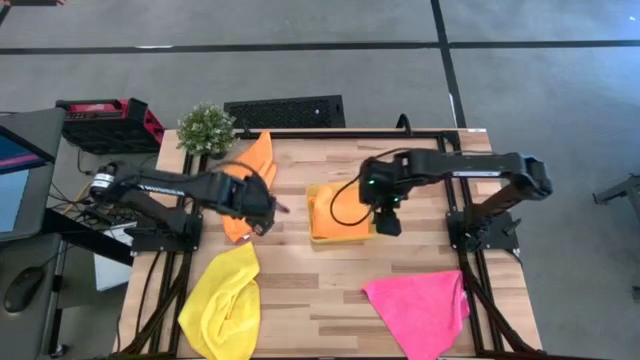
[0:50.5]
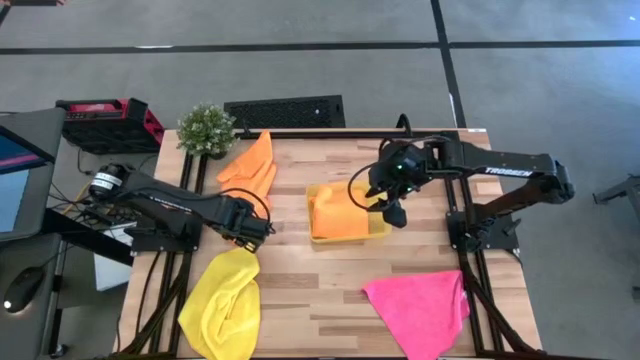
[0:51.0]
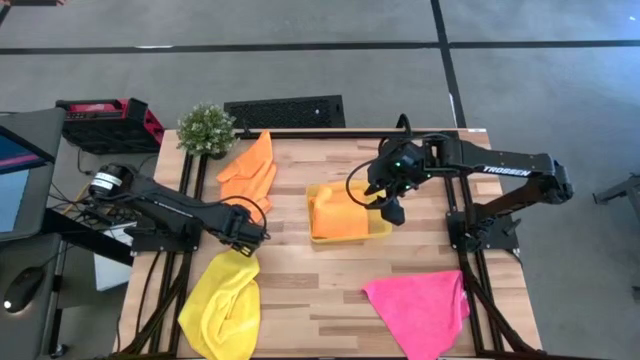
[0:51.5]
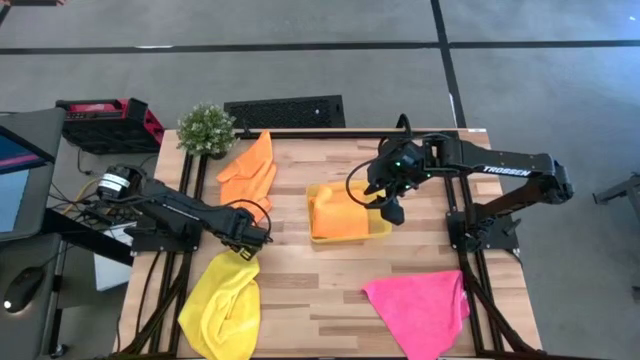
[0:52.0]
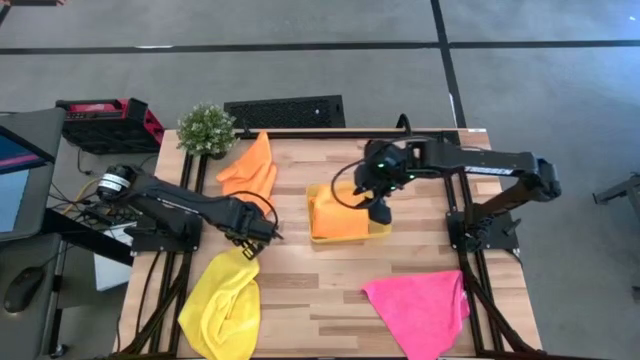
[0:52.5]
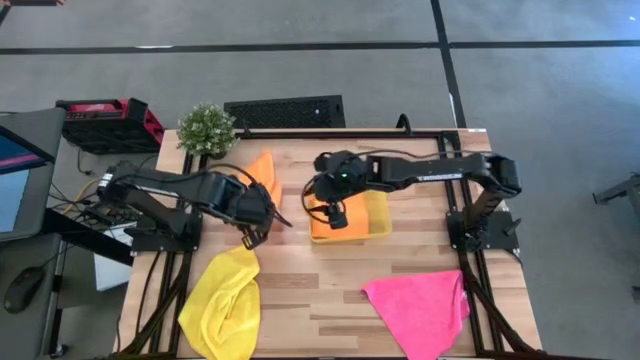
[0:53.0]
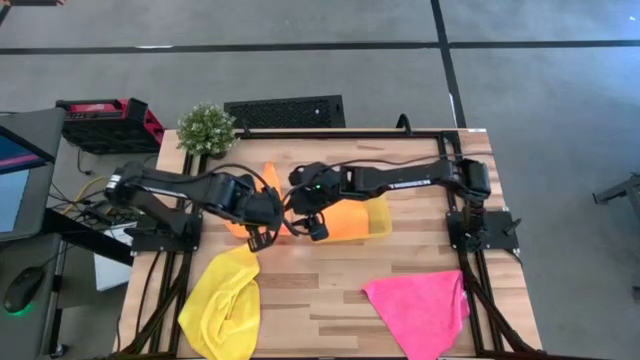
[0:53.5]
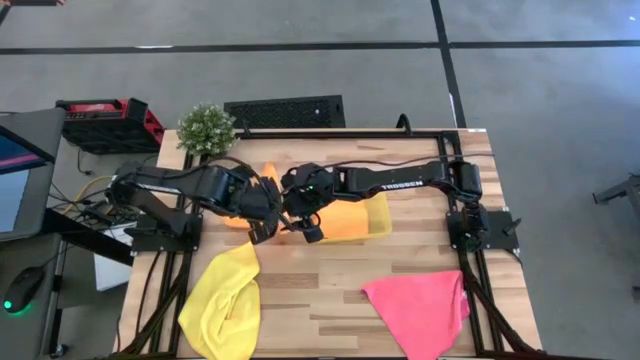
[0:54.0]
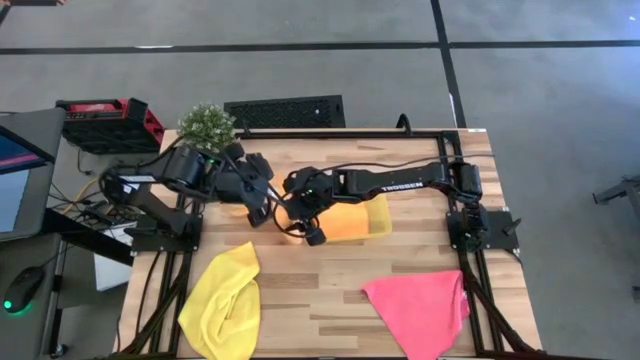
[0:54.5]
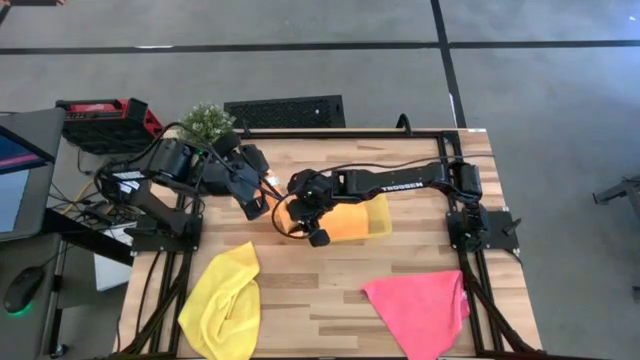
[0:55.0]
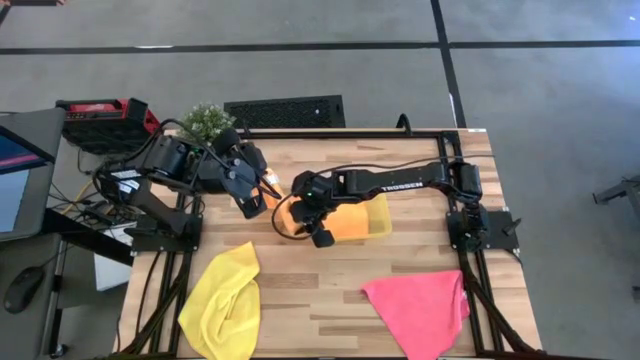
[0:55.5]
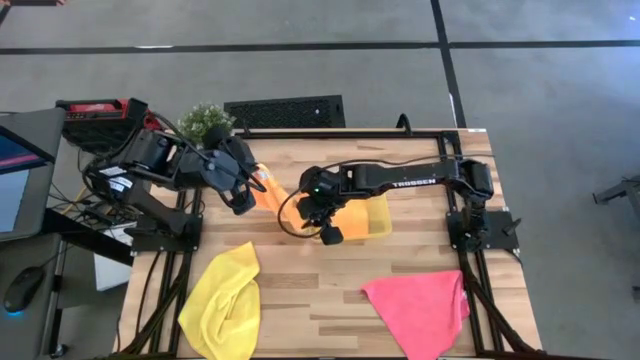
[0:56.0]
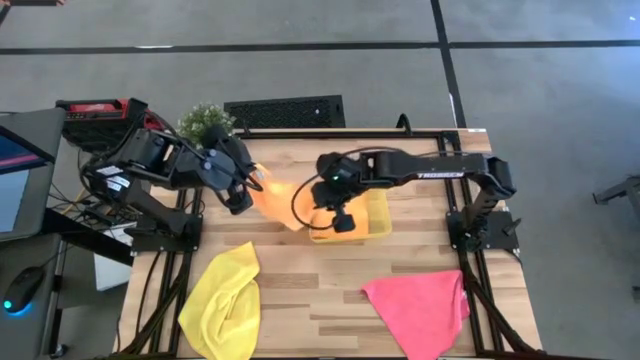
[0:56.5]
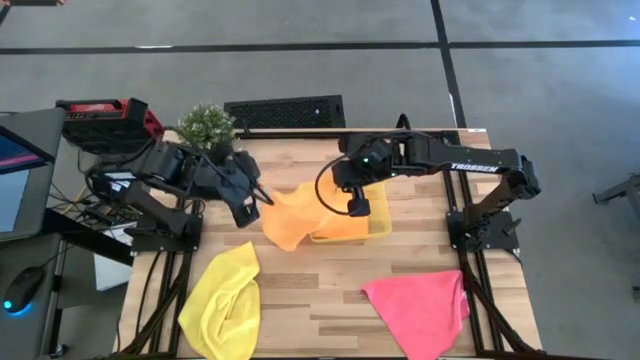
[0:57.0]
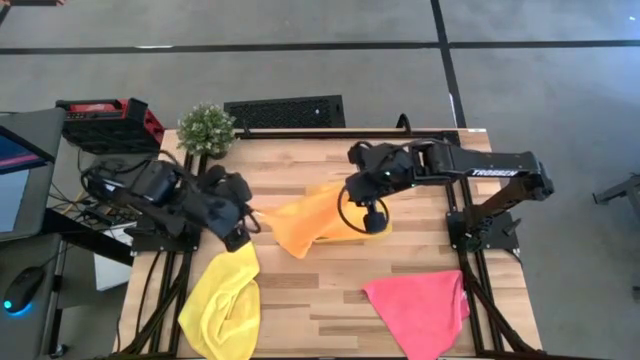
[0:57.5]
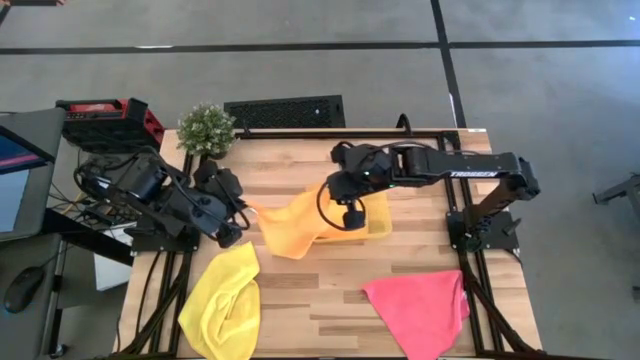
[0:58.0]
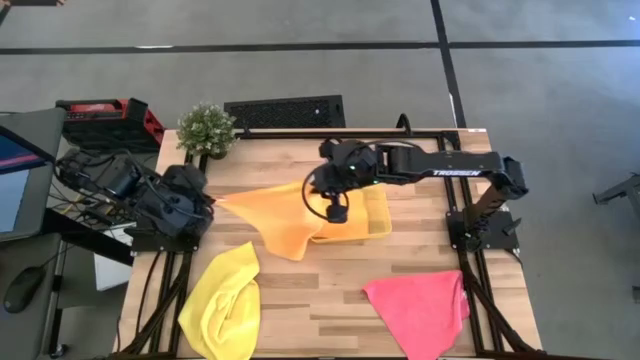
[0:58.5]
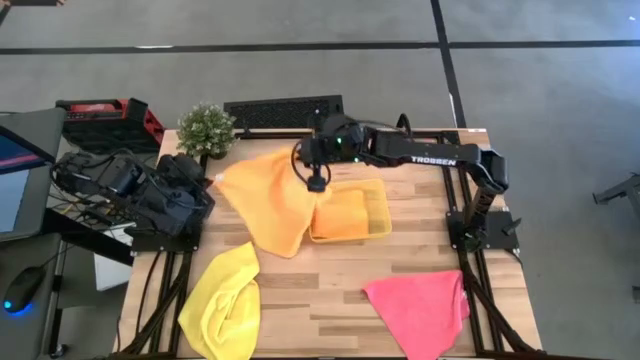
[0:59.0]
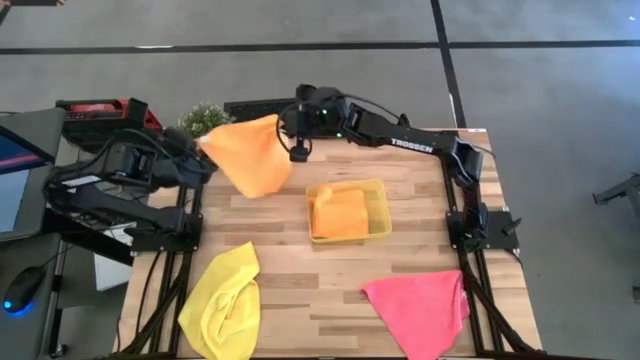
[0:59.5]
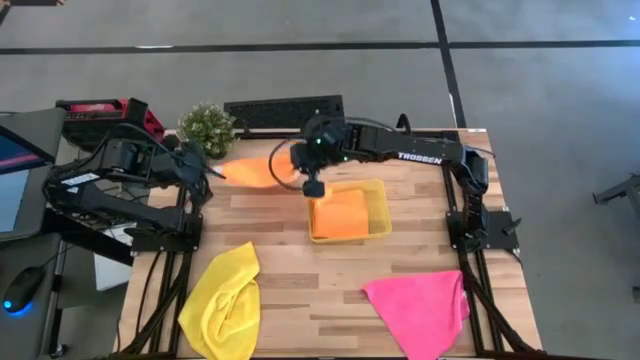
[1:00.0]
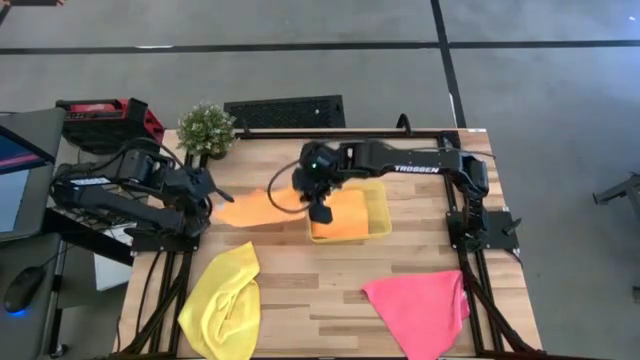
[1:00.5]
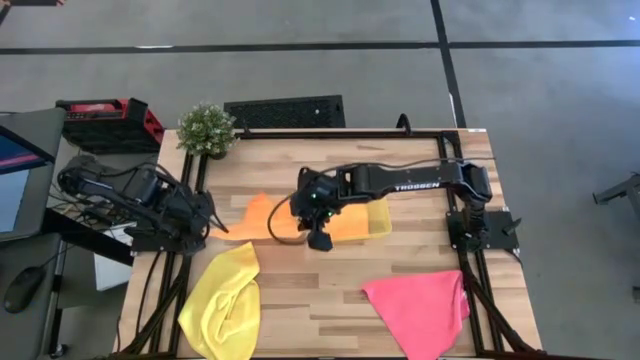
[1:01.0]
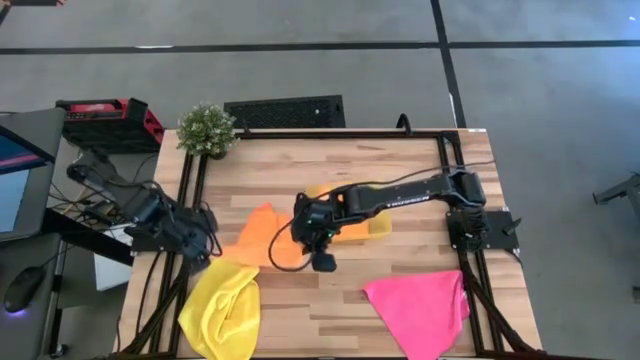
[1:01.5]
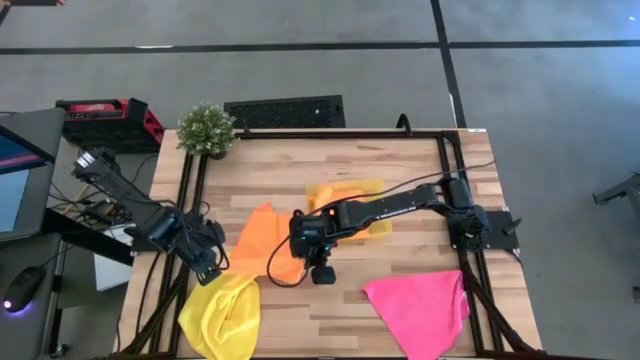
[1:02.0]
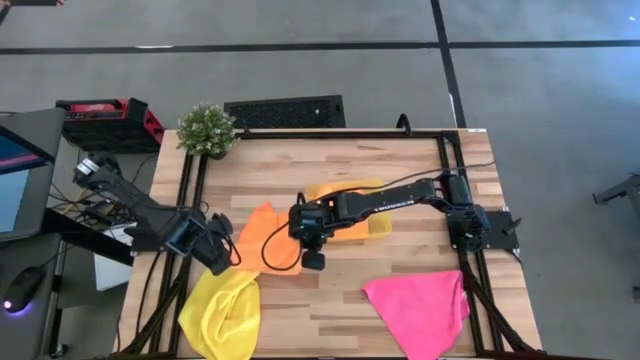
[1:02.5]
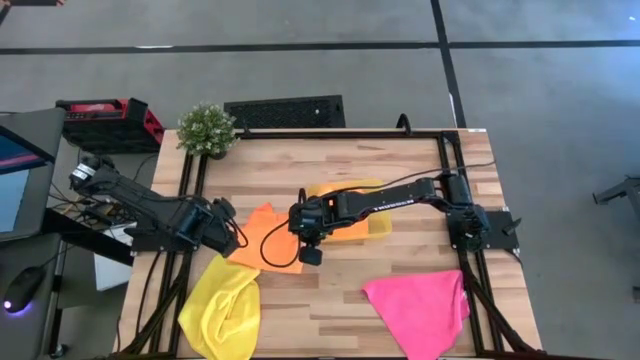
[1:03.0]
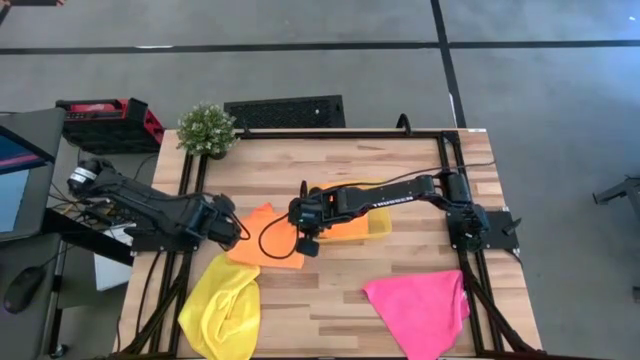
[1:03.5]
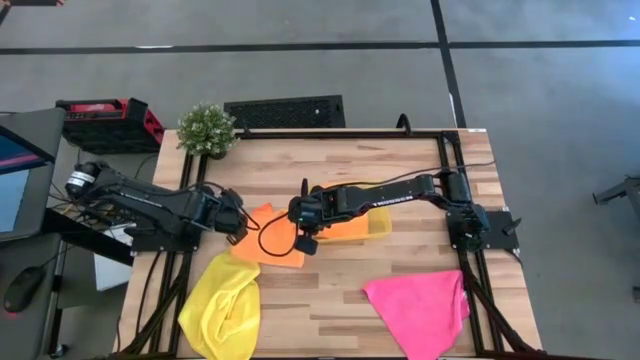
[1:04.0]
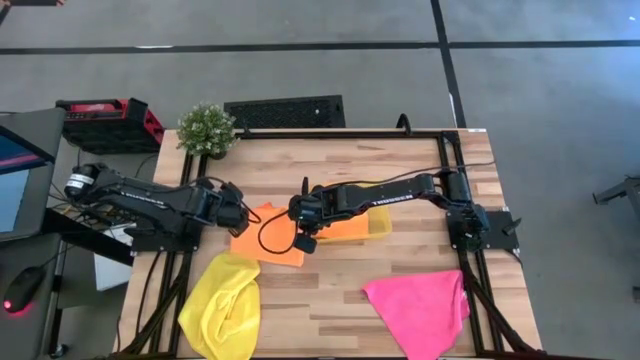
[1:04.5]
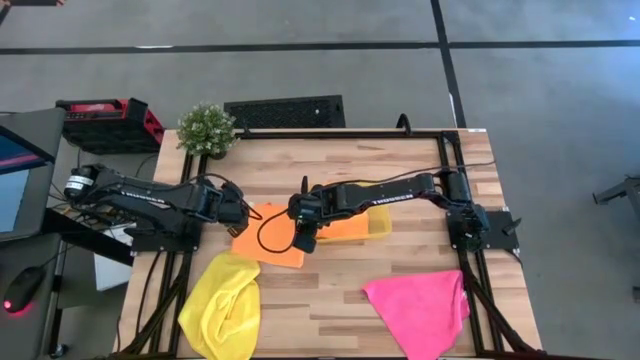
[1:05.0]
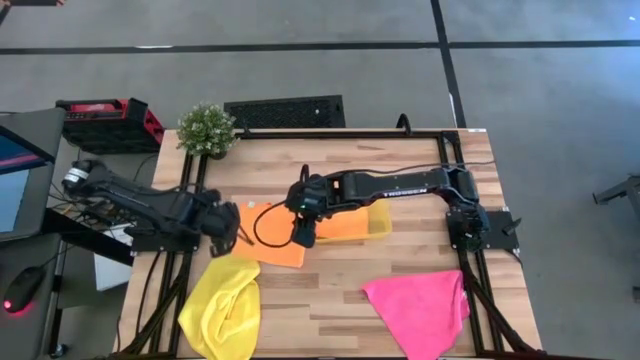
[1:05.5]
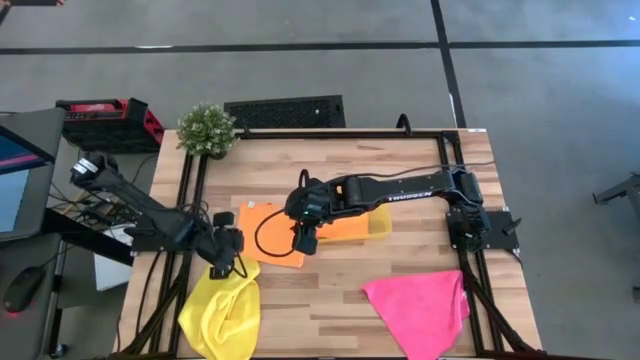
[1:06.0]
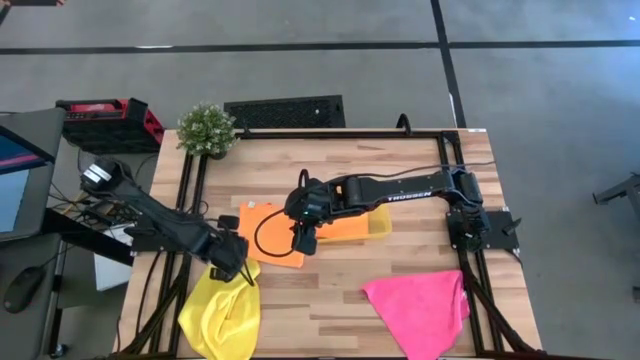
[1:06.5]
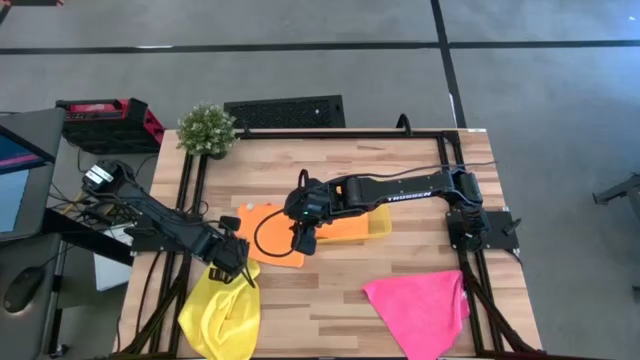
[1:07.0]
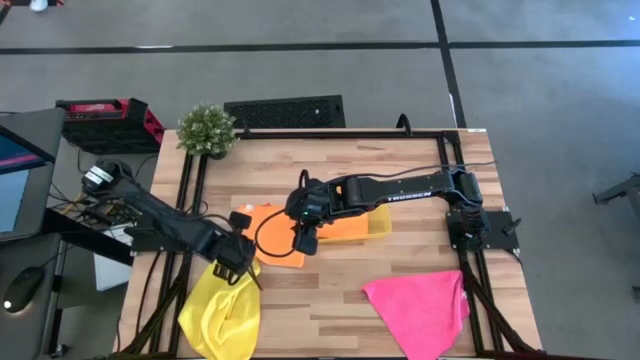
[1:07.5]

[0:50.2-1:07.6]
Task: Fold microfiber towels
Fold the orange microfiber towel

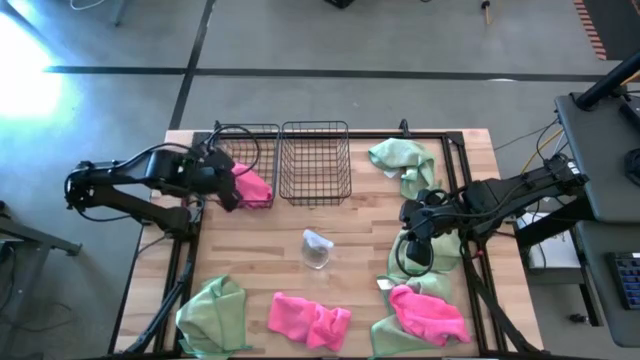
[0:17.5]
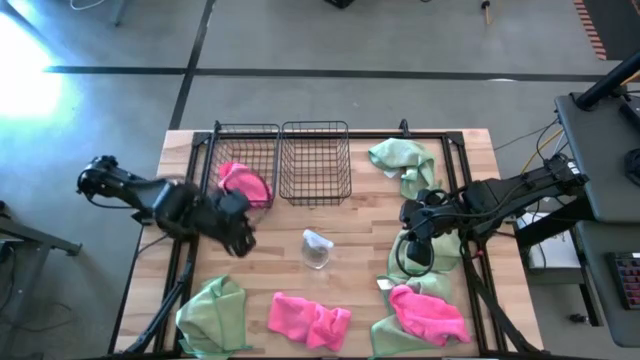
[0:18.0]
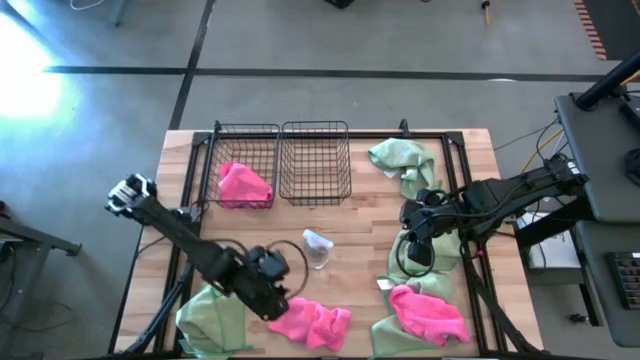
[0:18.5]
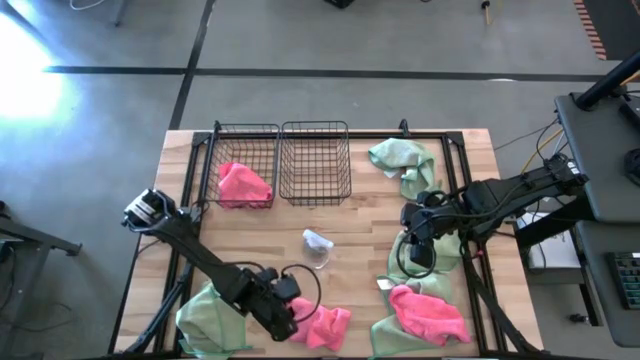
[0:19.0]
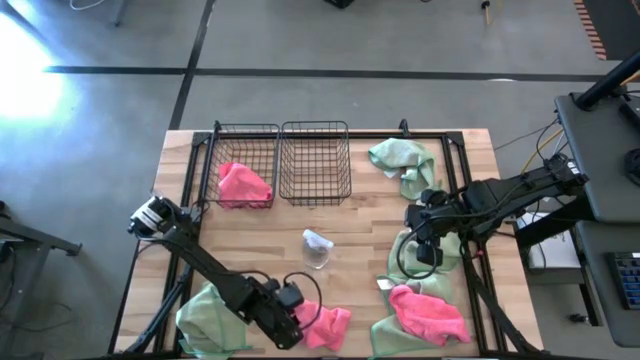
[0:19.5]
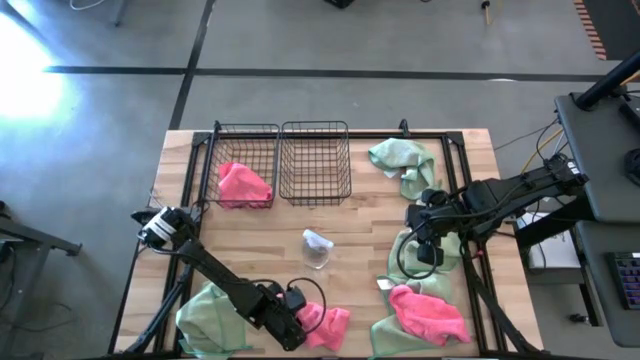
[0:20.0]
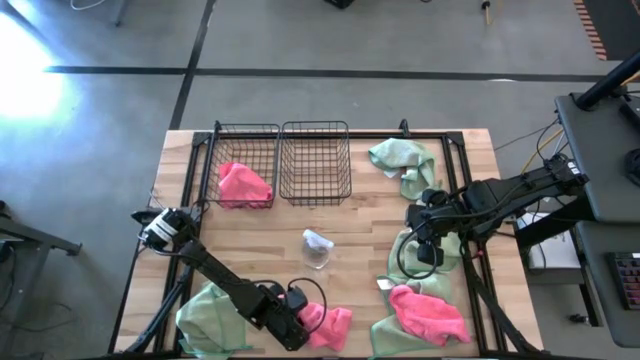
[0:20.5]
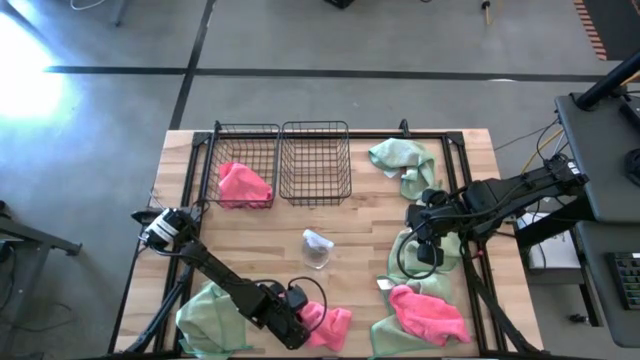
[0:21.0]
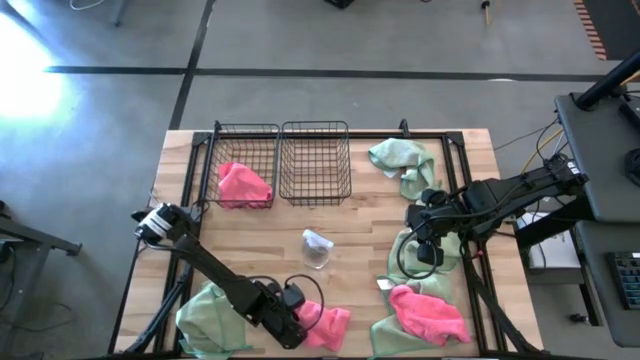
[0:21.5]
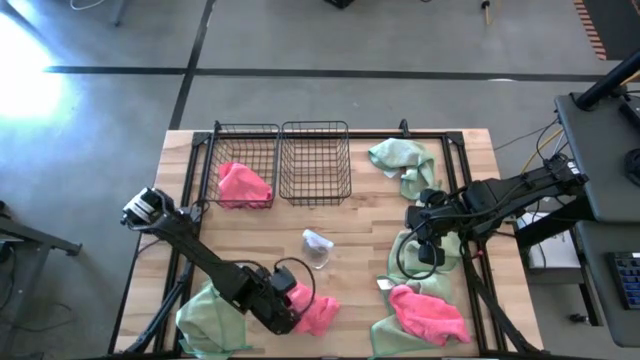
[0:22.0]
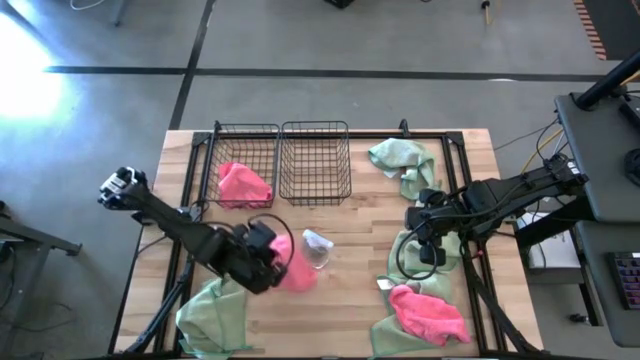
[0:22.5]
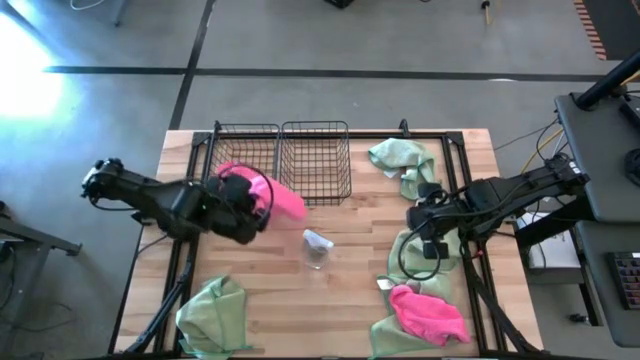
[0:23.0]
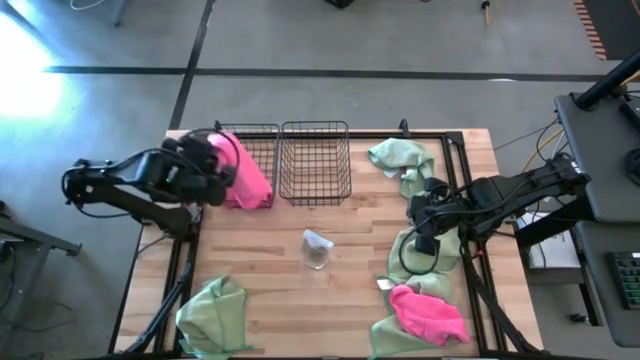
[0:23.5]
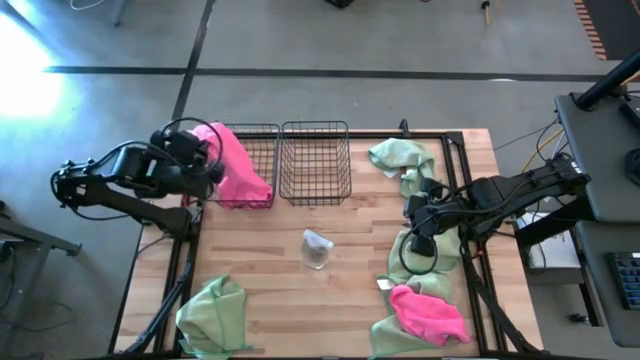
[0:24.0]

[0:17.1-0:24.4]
Task: Sort microfiber towel by color & place in baskets
Put the left pink microfiber towel into the left black wire basket
